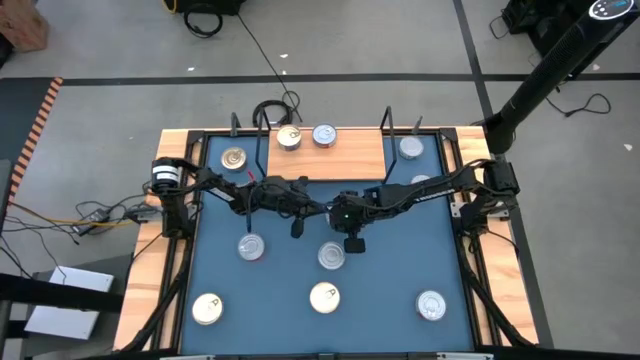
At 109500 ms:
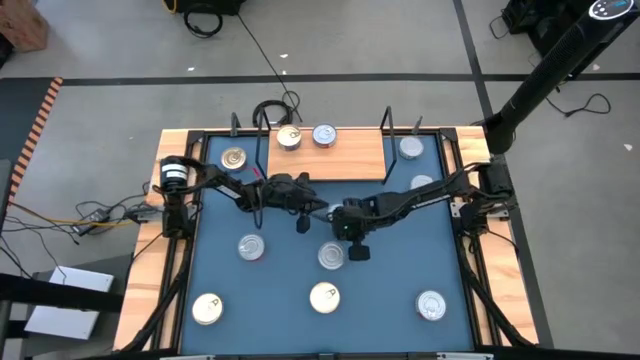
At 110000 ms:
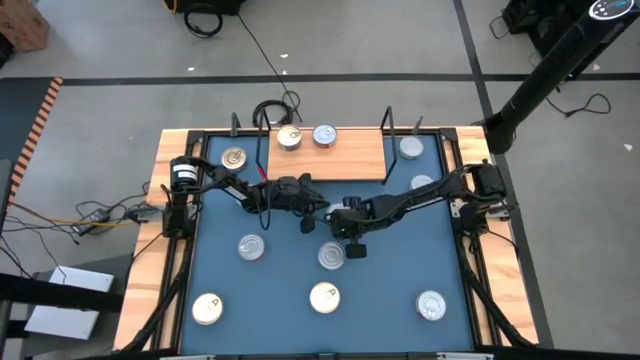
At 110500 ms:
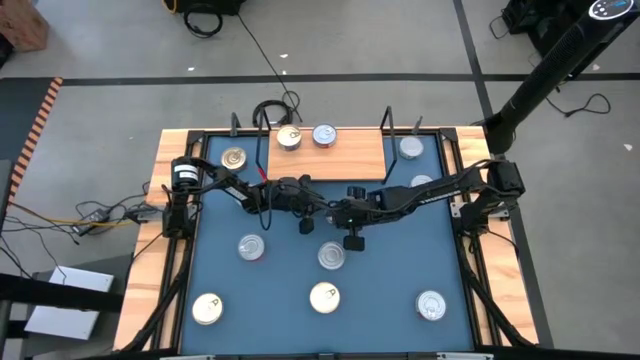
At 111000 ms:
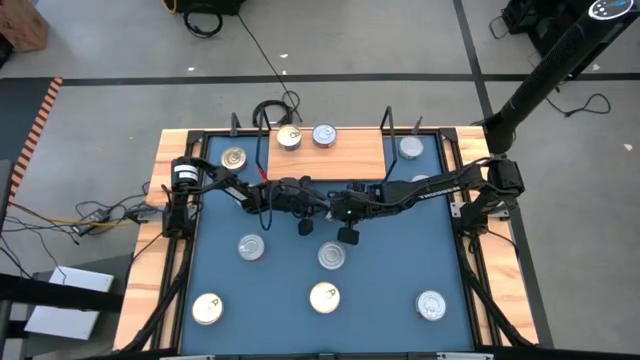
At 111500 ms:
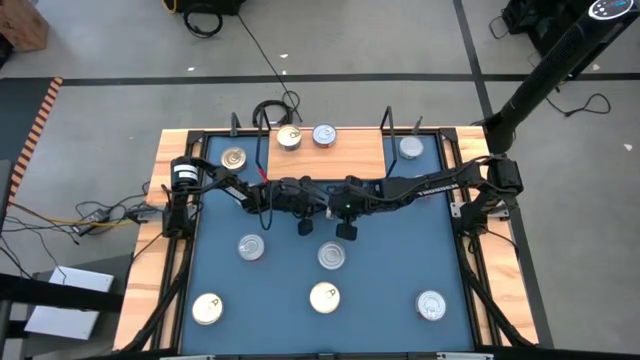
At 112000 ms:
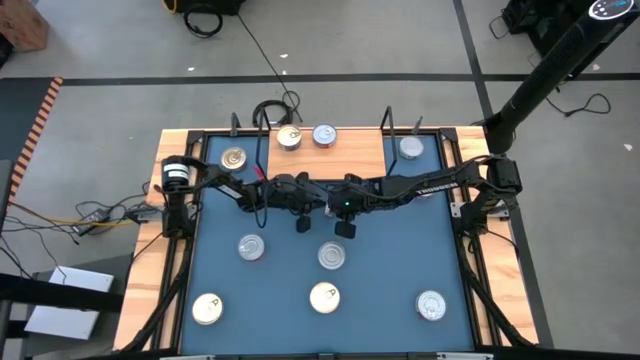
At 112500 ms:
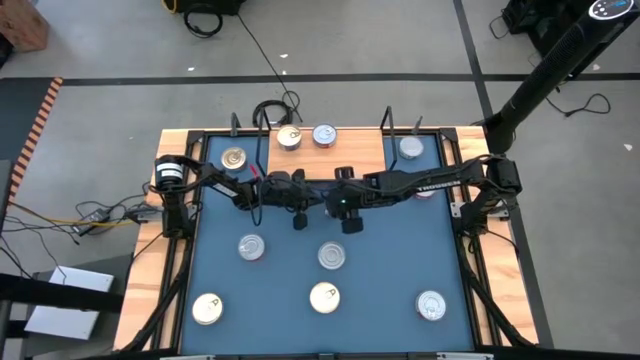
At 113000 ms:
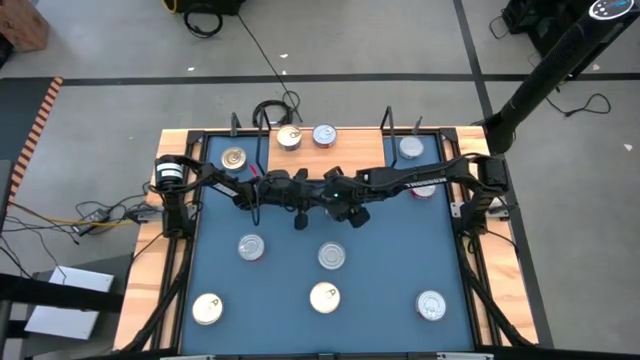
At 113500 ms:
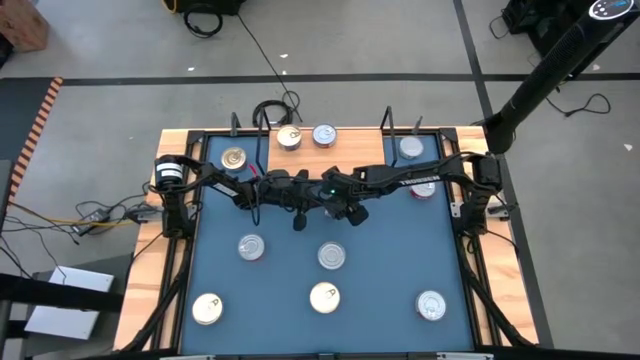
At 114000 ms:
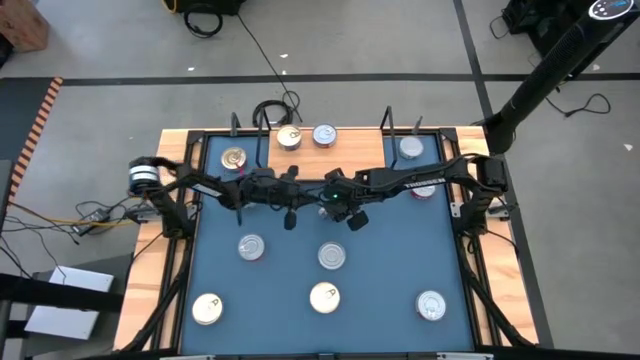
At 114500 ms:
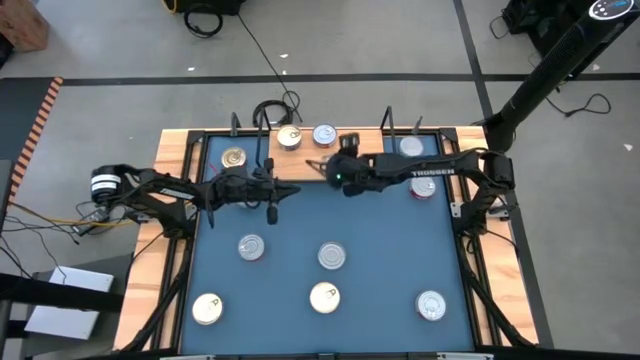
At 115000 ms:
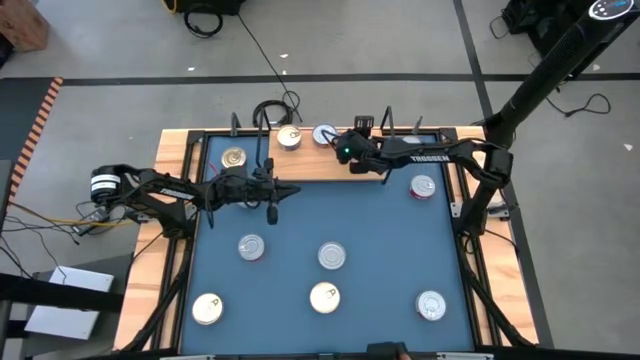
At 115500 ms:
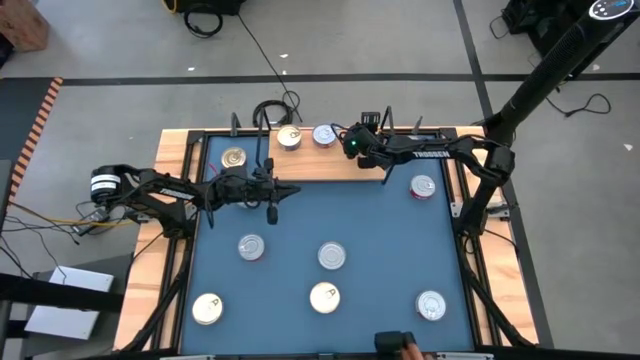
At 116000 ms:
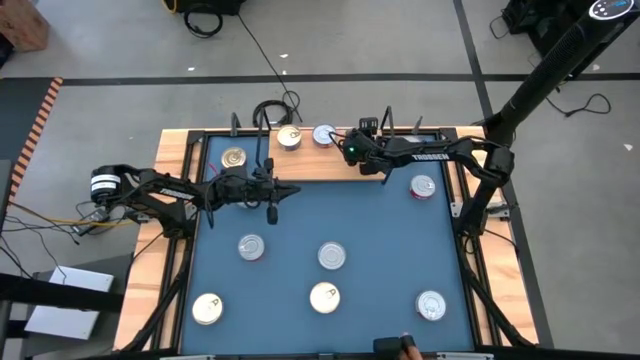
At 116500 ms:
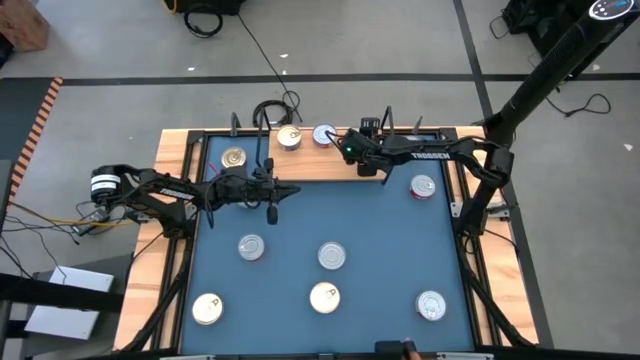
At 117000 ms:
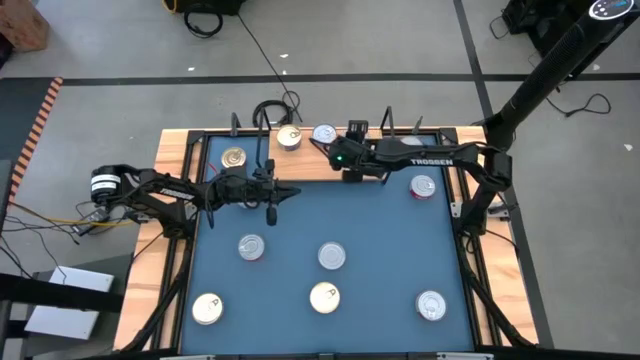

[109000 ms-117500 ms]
Task: Stack canned seafood by type on shelf
Put the white tuna can on the shelf

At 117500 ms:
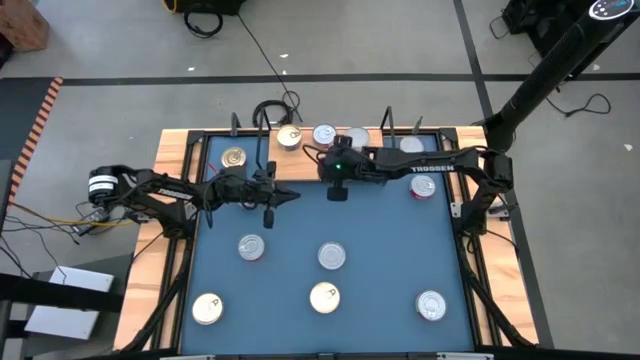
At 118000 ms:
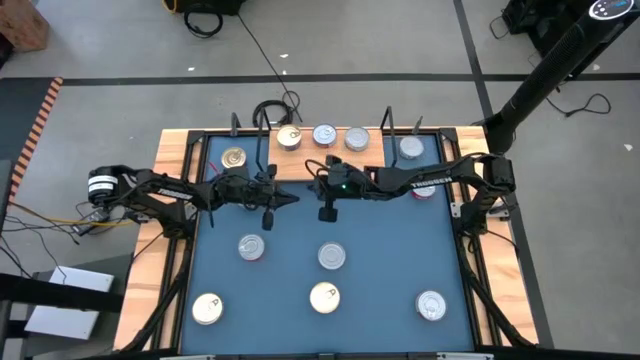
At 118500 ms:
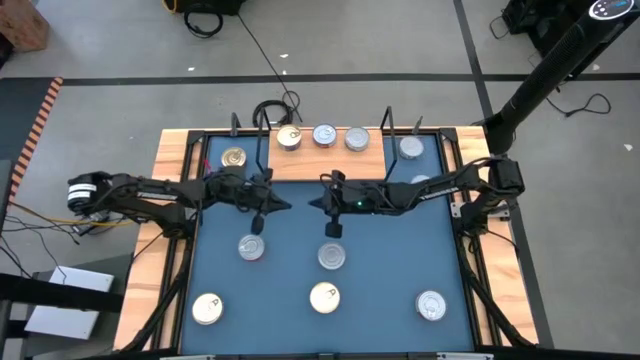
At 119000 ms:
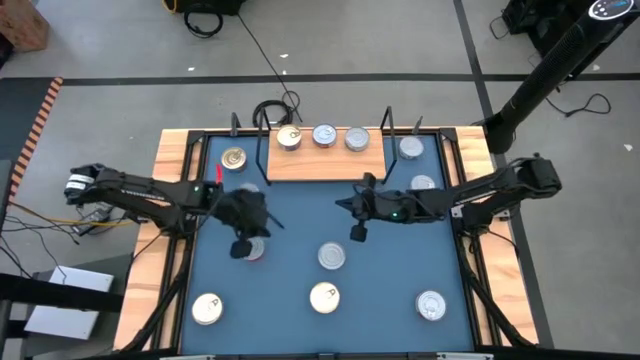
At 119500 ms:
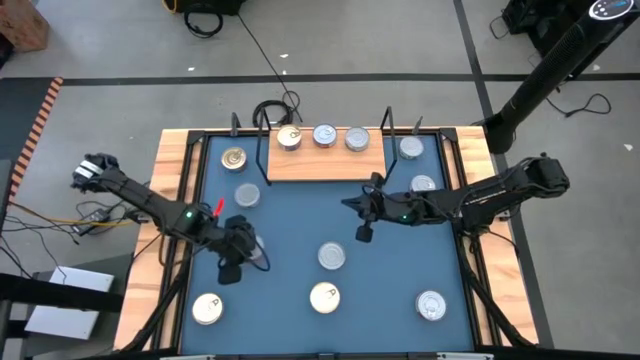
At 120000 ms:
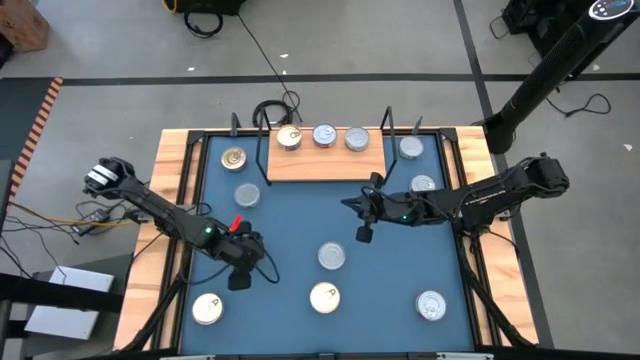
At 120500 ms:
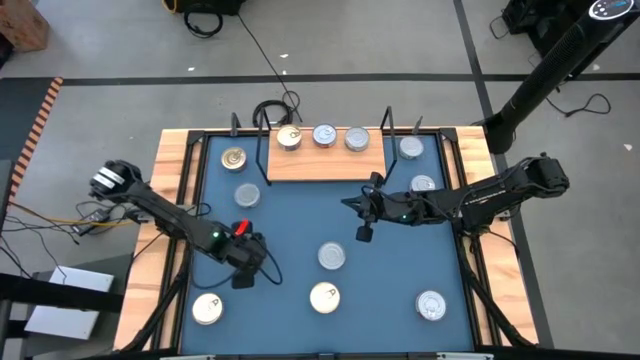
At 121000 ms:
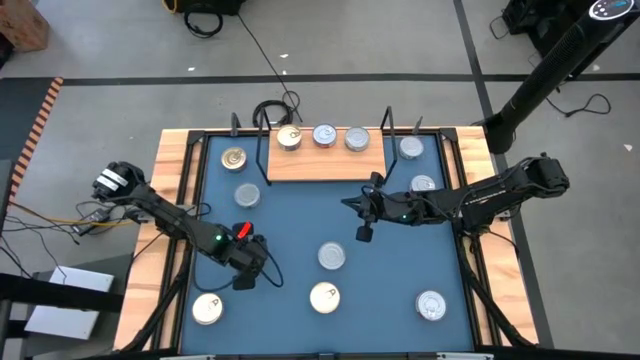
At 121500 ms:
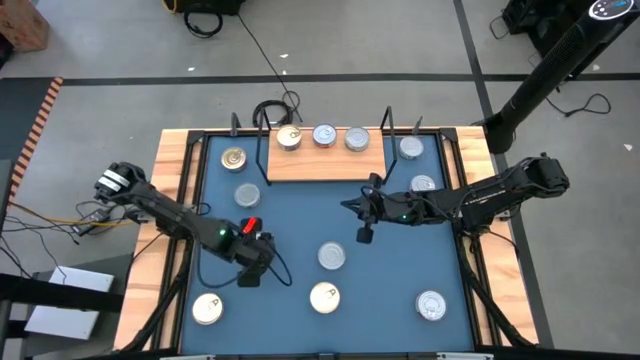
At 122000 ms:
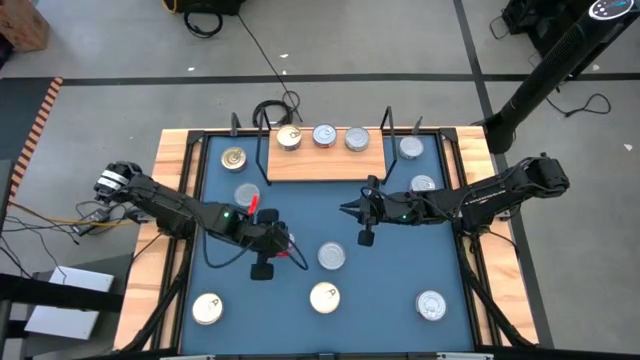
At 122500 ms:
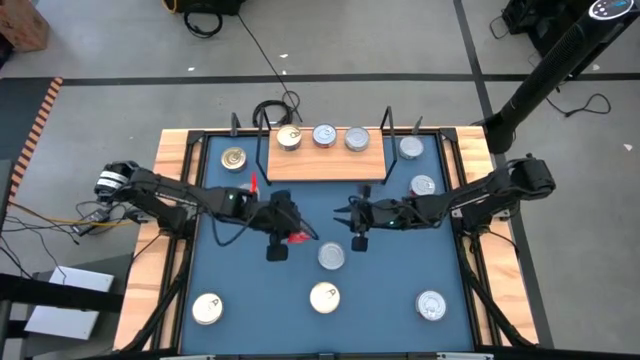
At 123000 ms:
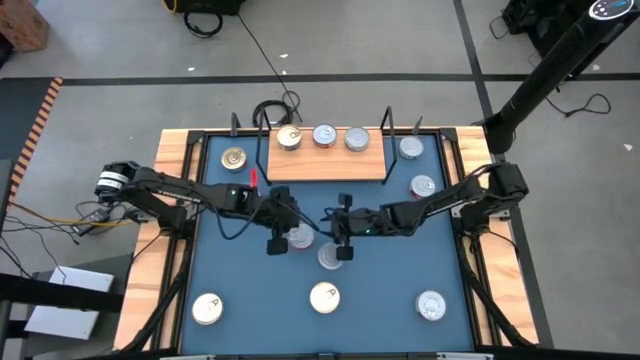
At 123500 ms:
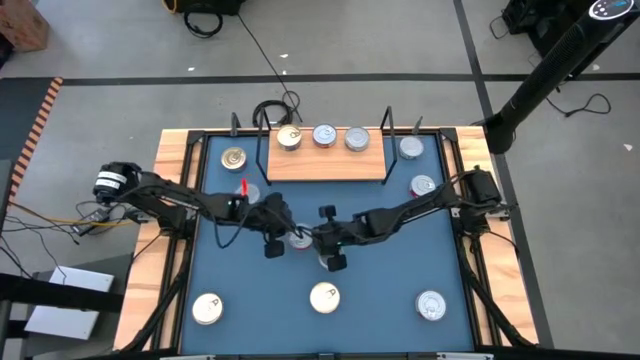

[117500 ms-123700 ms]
Put the middle left red tuna can on the shelf

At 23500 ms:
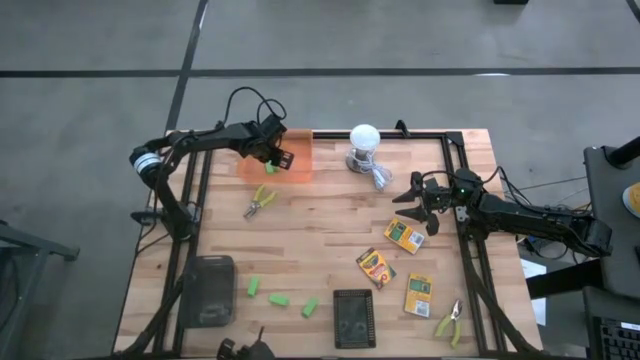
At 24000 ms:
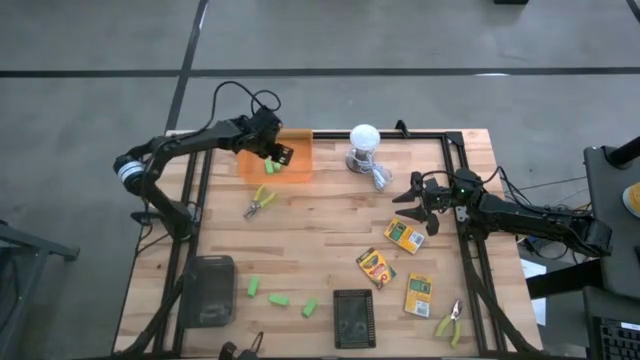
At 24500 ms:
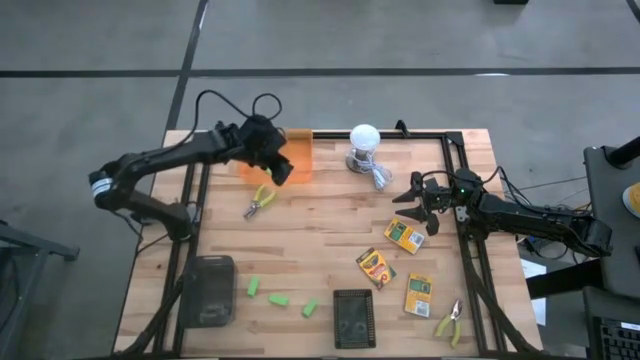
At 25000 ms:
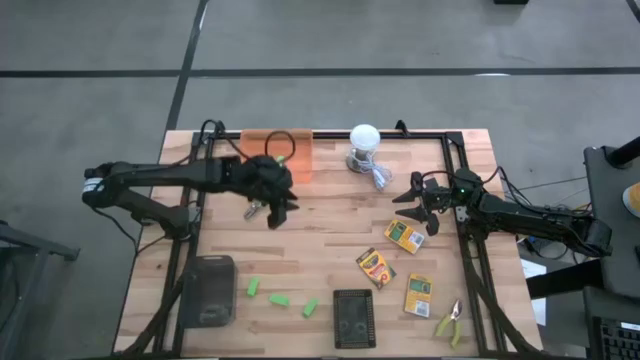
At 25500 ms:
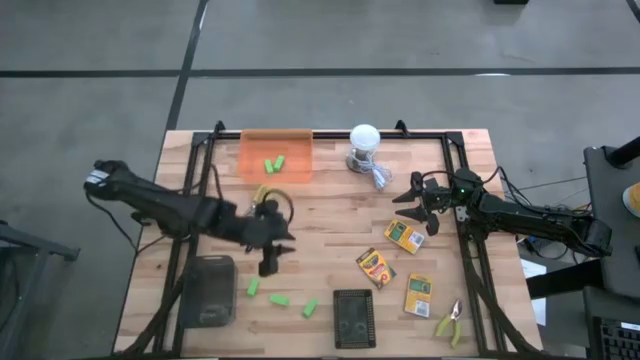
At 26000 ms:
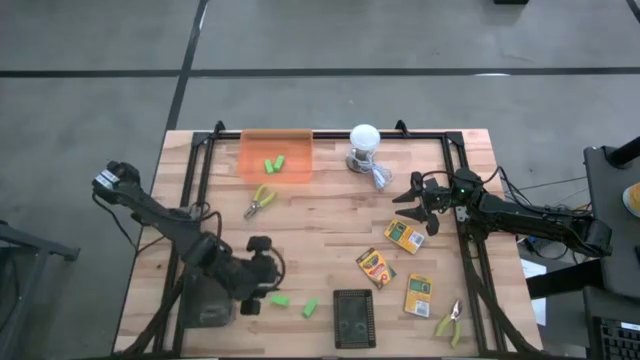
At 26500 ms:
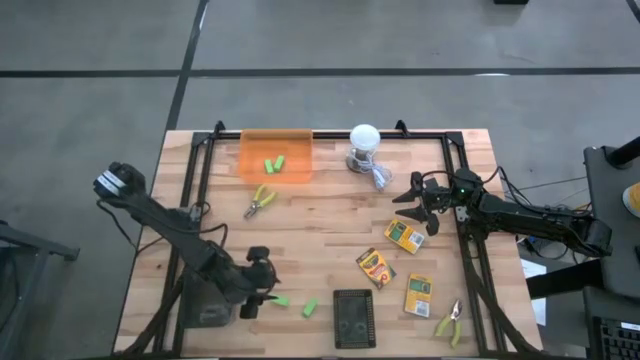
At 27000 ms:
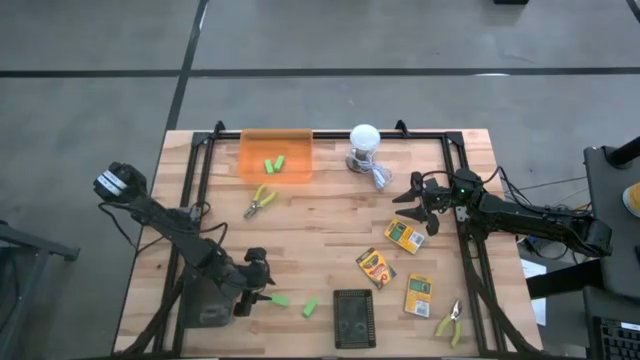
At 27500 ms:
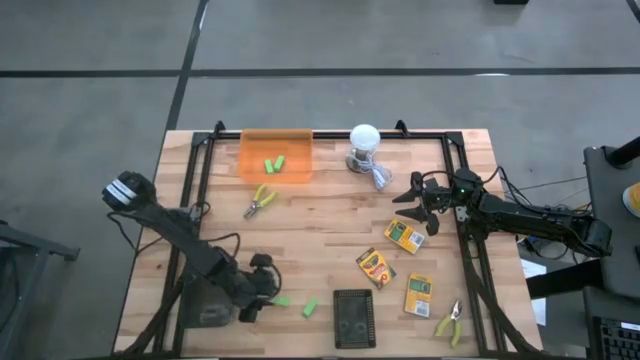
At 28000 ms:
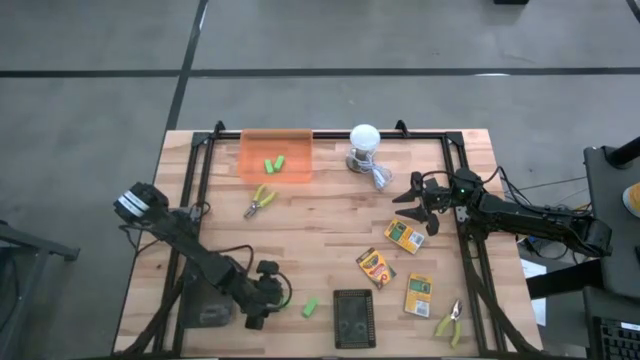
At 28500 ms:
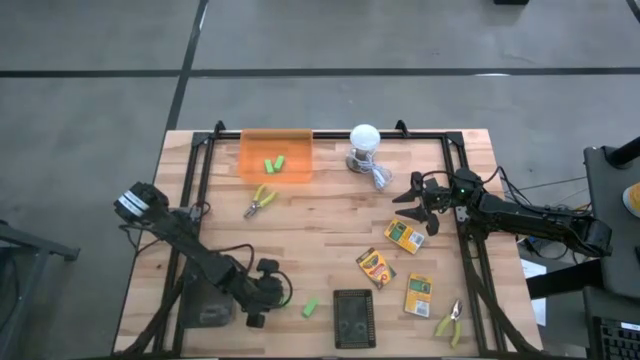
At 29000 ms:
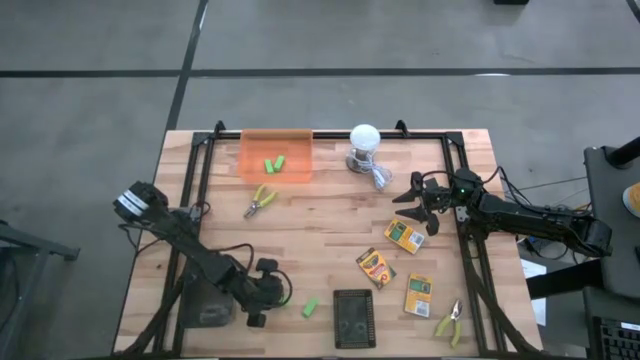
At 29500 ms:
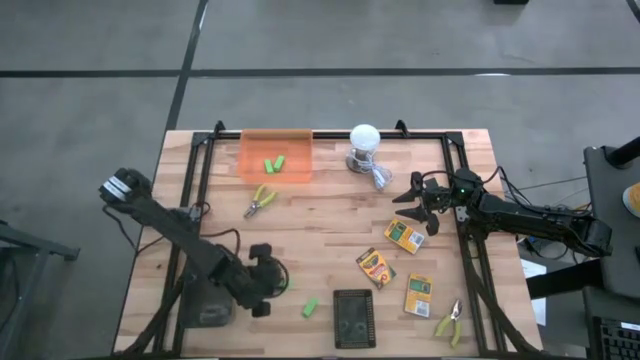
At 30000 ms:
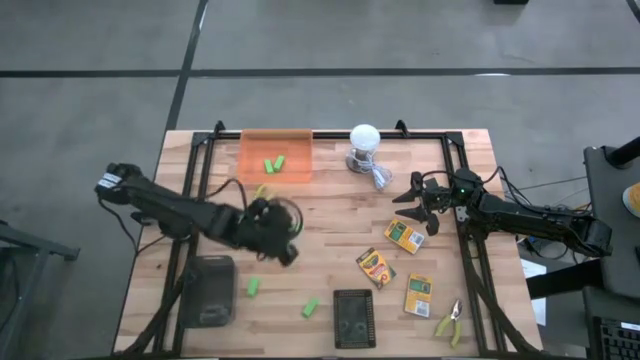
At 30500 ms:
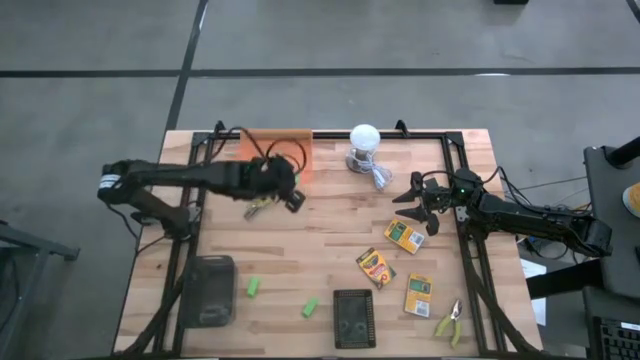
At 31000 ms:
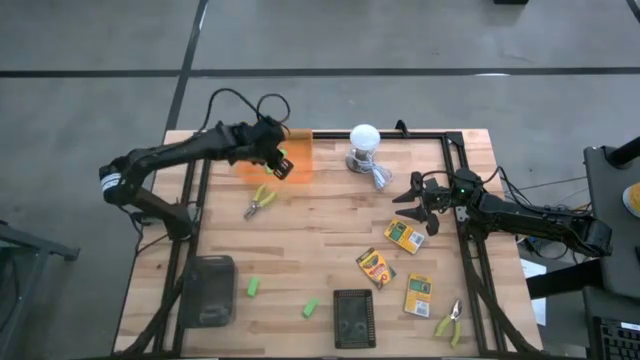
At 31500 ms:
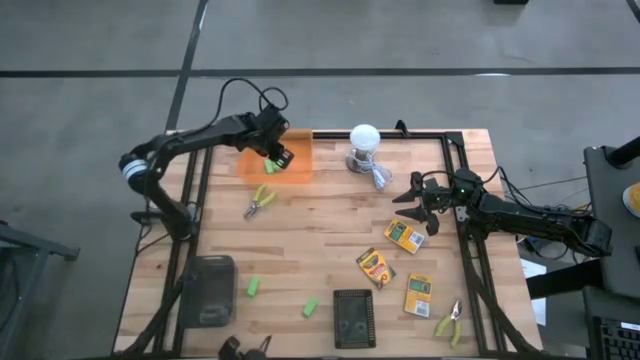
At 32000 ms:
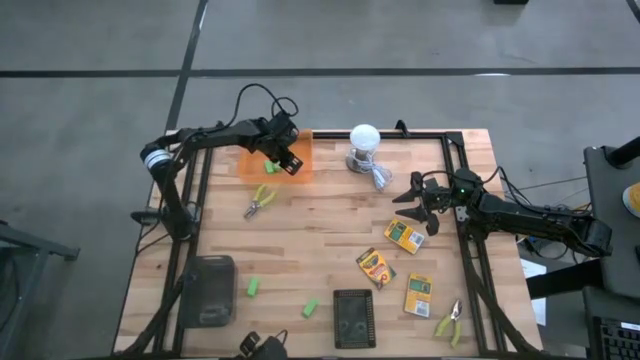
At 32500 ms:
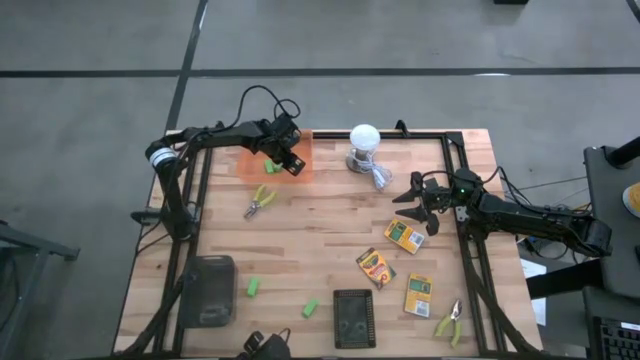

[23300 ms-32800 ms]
Task: Pick & Place School Supplies
Put the green eraser into the orange bin
